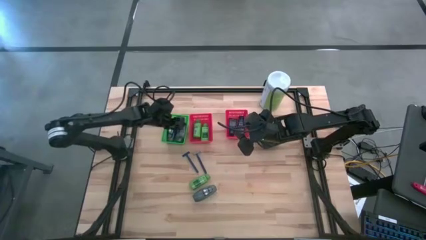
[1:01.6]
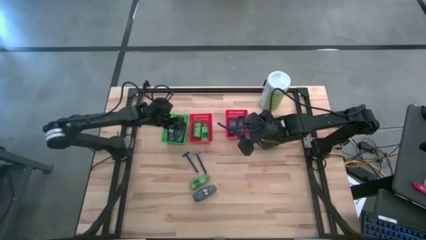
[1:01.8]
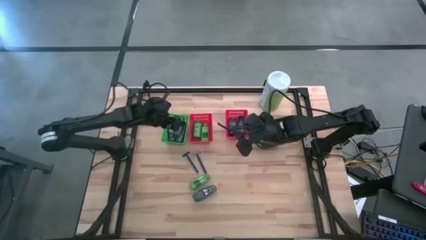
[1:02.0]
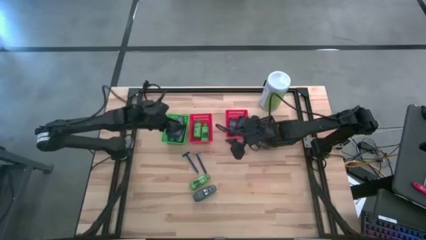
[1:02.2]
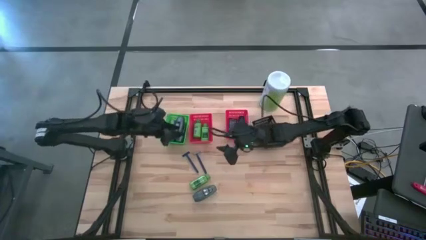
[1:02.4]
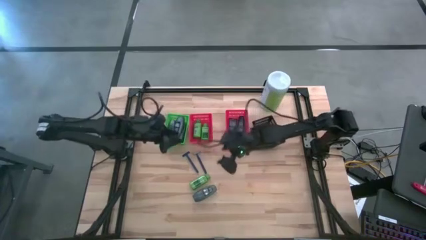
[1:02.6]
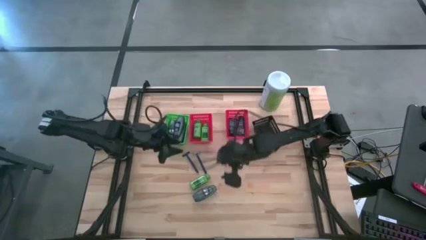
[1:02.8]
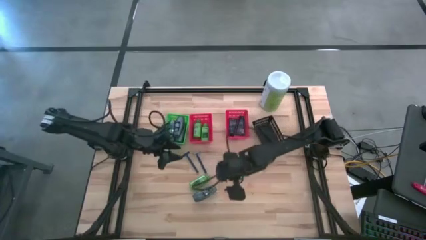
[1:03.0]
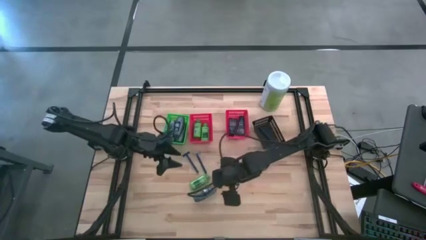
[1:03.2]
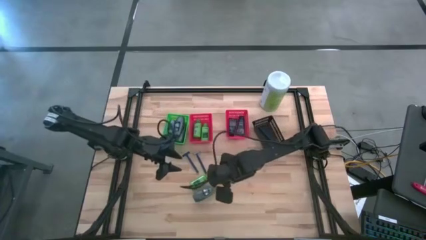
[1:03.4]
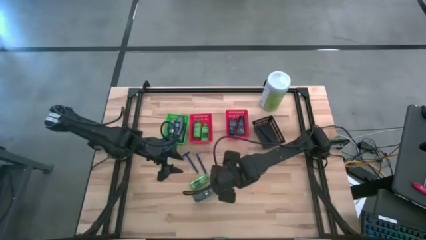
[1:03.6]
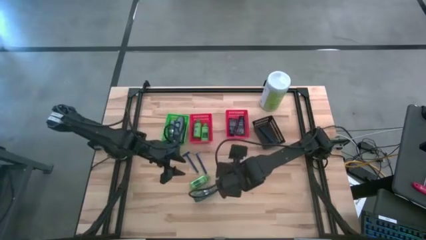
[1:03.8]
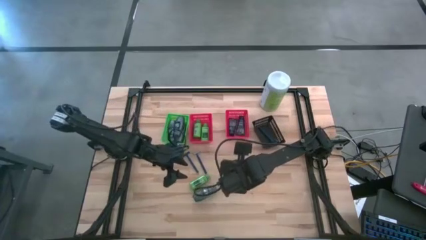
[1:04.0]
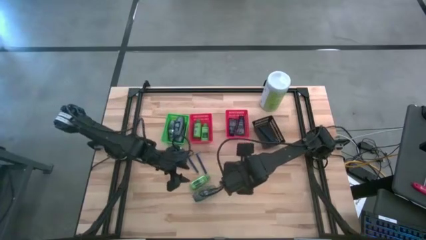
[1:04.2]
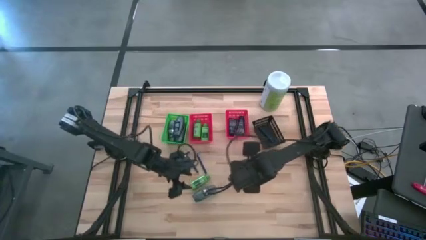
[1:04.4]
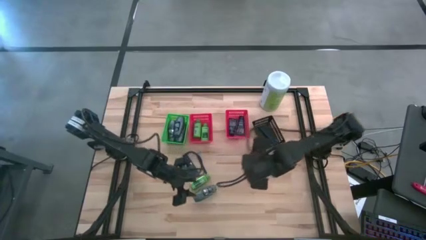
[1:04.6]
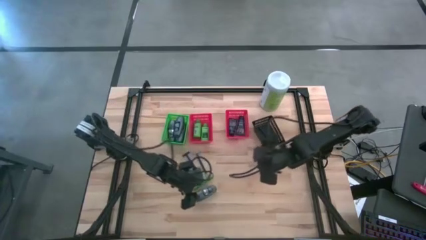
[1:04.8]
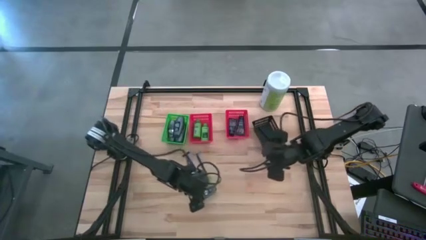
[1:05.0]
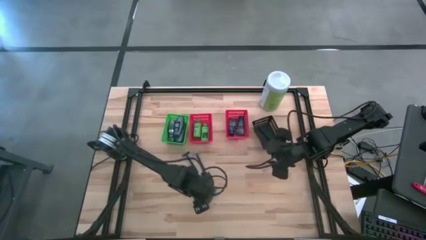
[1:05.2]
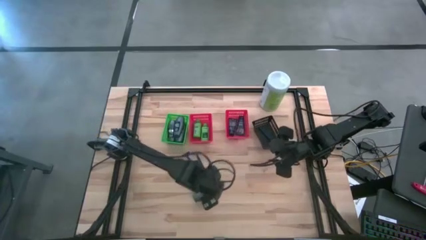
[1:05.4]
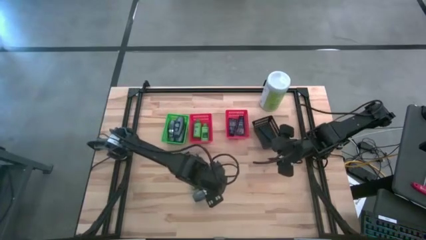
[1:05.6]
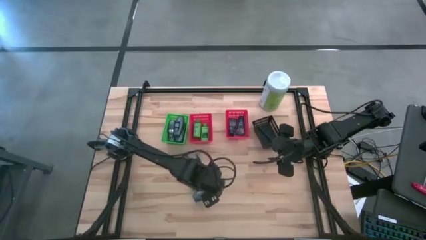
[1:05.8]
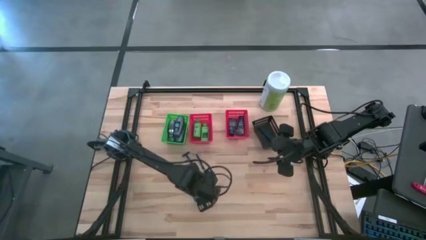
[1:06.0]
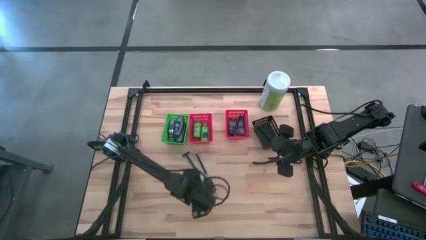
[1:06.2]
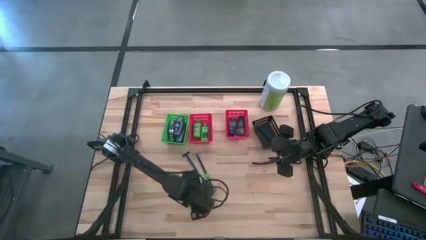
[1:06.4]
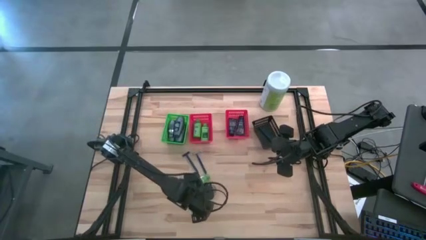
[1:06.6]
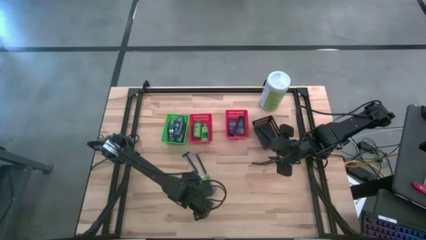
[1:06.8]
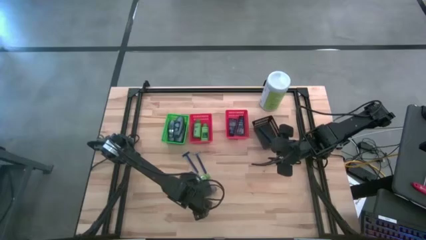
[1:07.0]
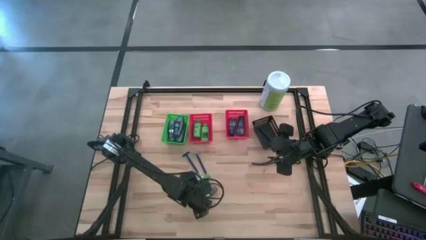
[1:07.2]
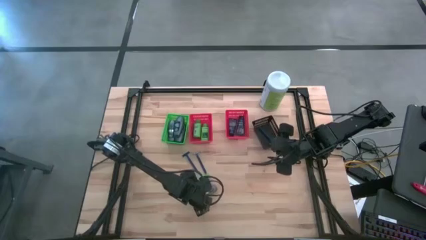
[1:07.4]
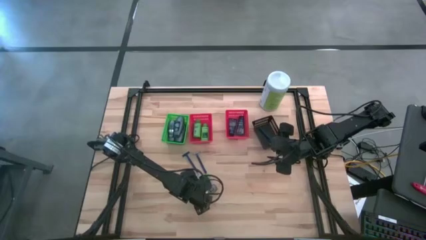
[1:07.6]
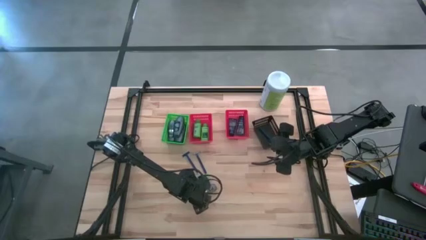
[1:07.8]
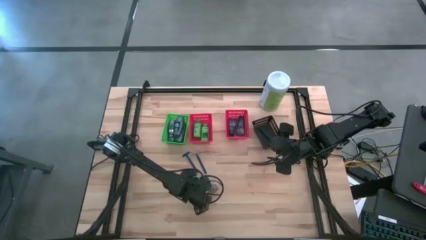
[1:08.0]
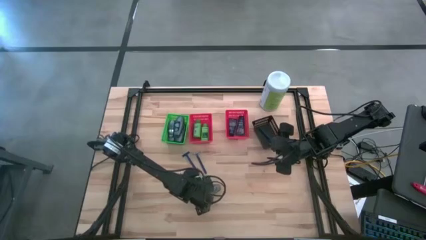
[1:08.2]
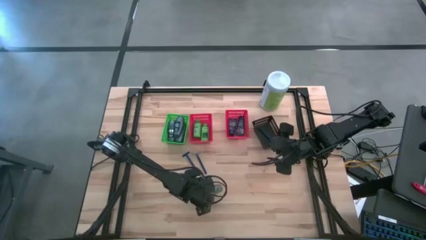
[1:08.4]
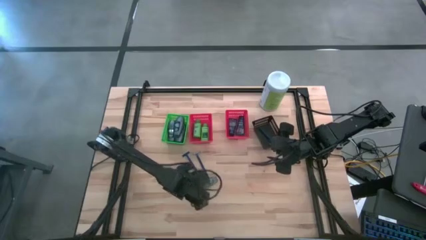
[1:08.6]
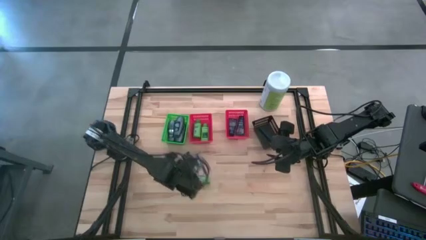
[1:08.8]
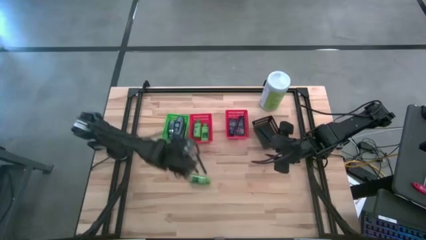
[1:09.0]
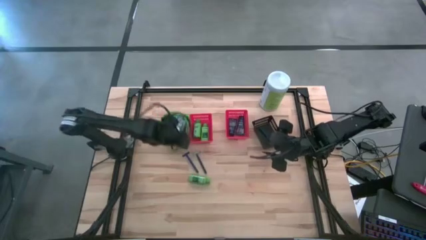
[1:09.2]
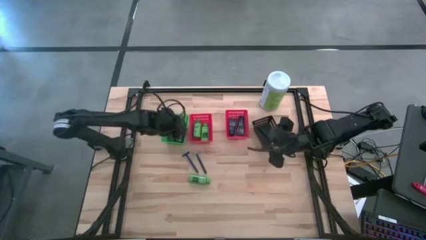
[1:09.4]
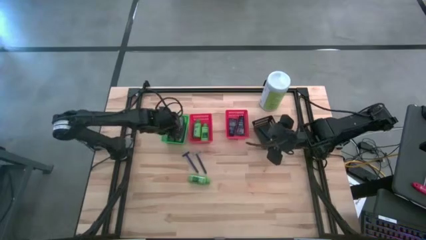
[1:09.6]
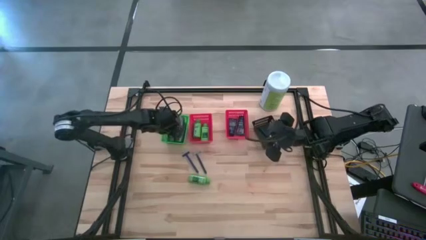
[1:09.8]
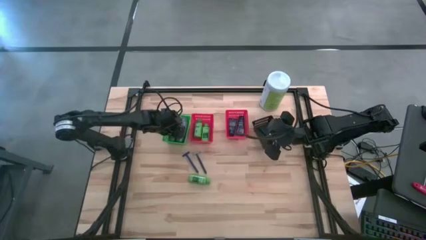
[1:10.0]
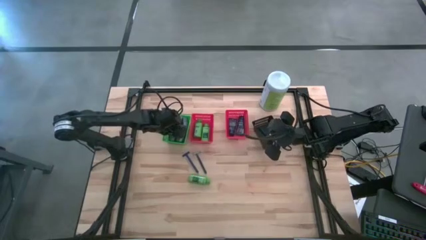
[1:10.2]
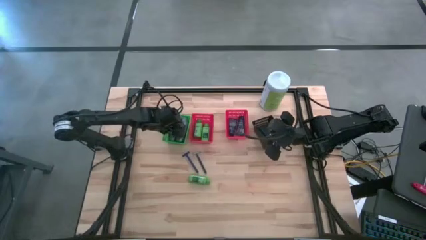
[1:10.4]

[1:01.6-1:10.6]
Task: Pick & Place Travel size toiletries
Put the gray deodorant into the green bin

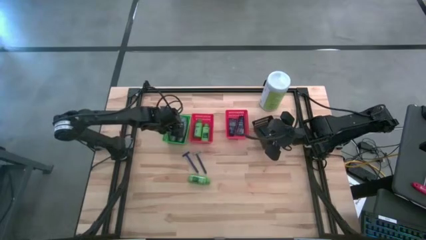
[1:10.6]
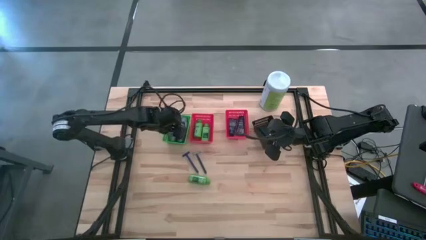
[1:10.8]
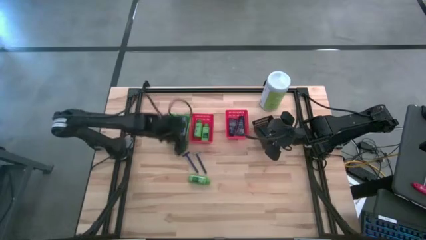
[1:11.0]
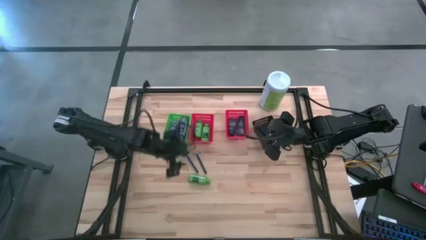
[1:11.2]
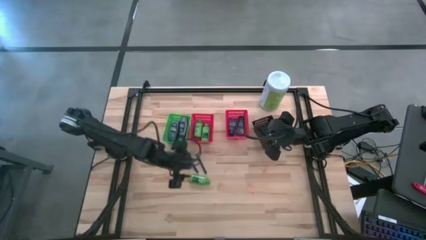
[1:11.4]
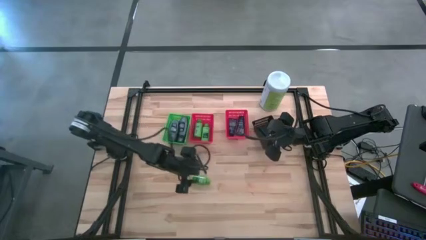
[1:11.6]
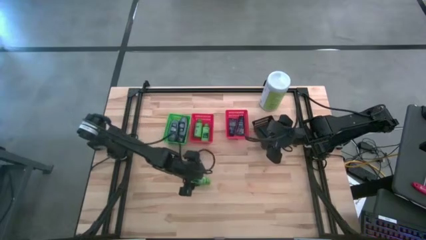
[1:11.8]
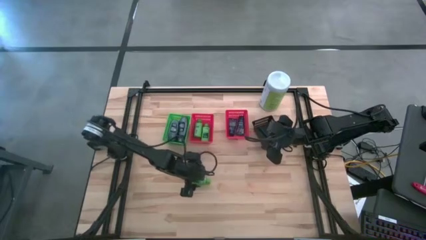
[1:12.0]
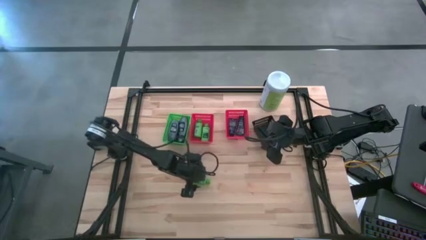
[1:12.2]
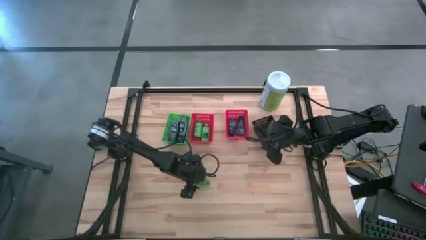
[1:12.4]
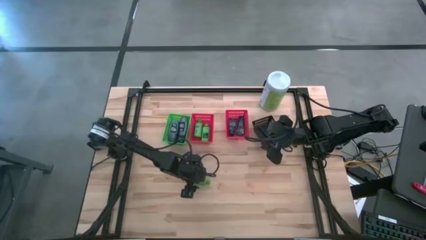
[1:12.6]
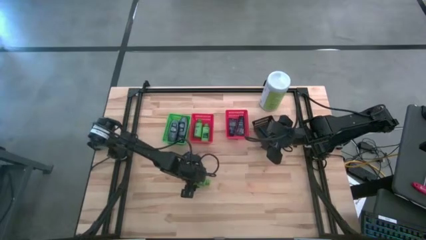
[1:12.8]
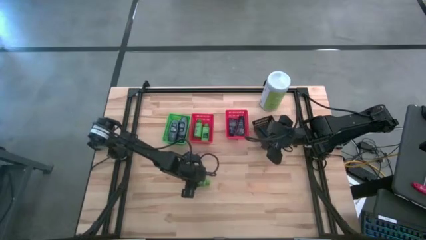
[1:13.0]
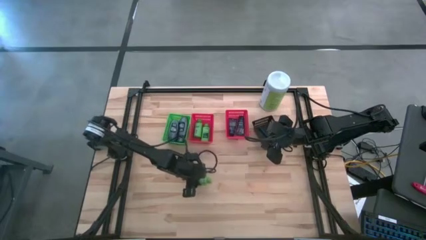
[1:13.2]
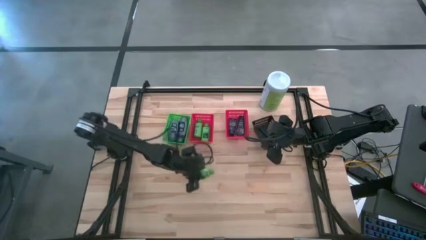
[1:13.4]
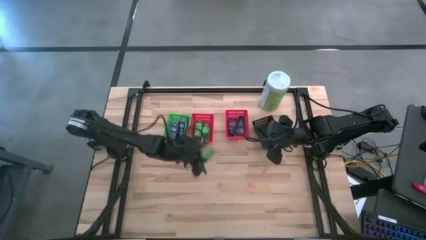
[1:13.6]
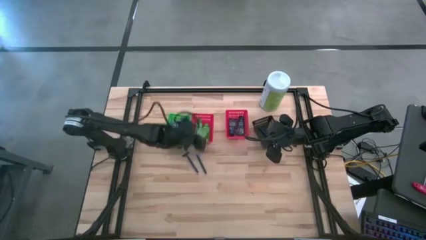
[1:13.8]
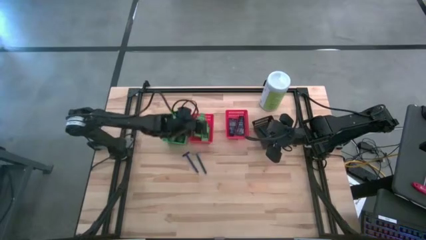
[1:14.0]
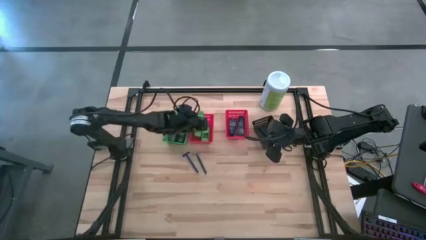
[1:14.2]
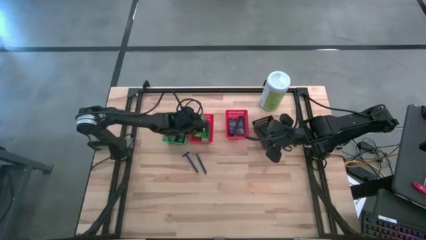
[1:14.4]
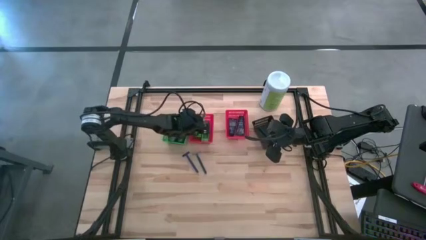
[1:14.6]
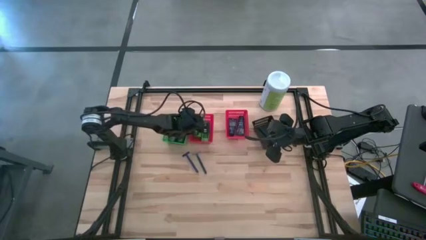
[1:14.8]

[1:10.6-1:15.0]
Put the green shampoo bottle into the left red bin
